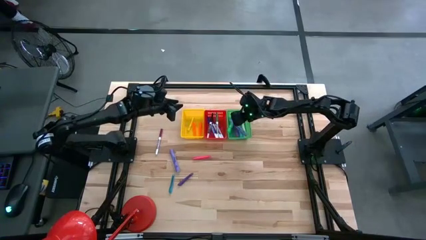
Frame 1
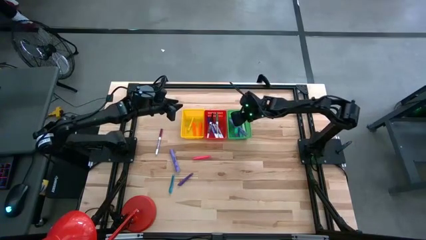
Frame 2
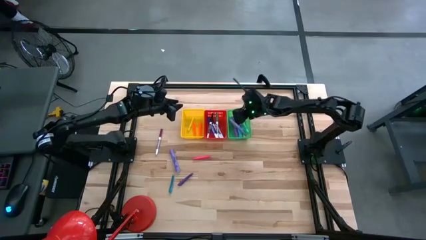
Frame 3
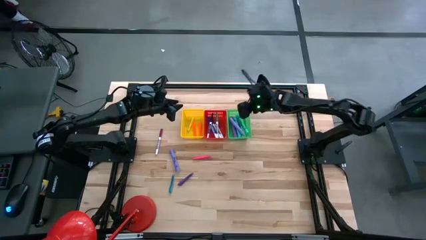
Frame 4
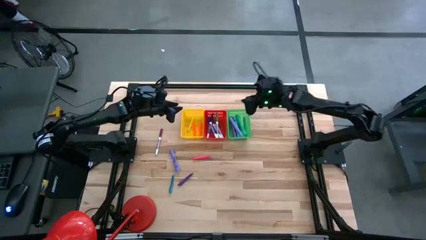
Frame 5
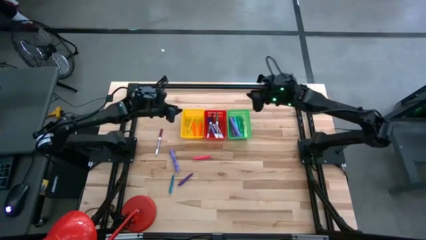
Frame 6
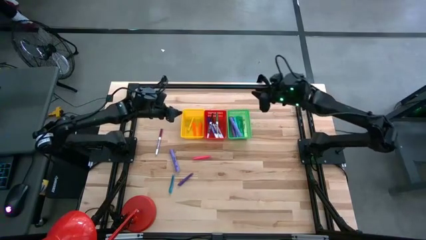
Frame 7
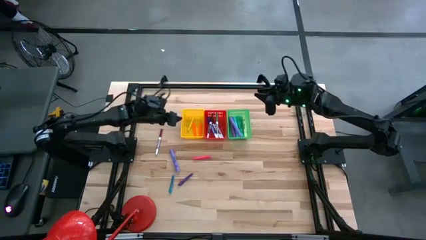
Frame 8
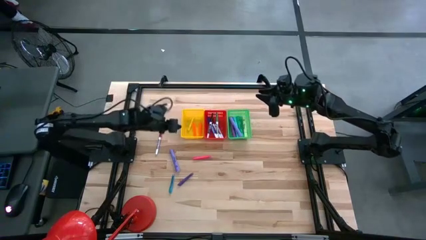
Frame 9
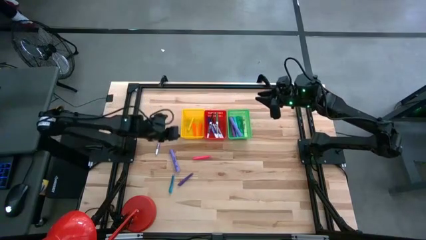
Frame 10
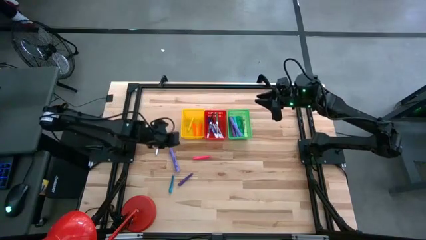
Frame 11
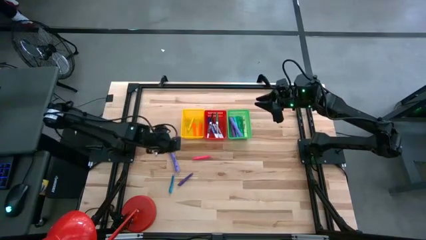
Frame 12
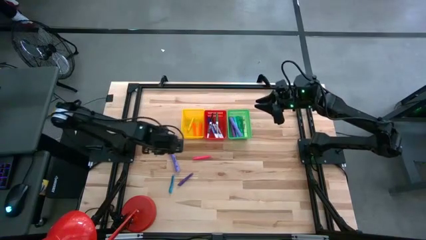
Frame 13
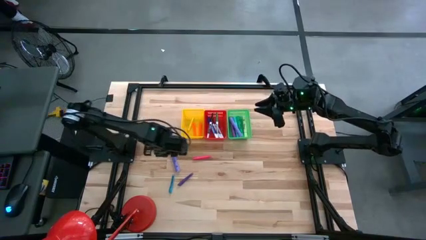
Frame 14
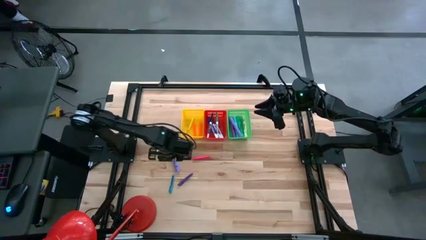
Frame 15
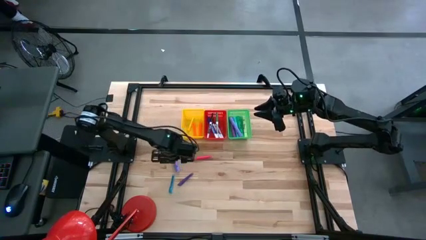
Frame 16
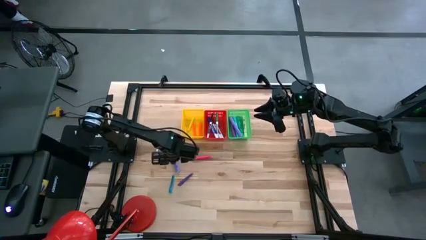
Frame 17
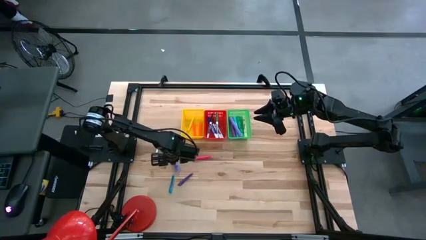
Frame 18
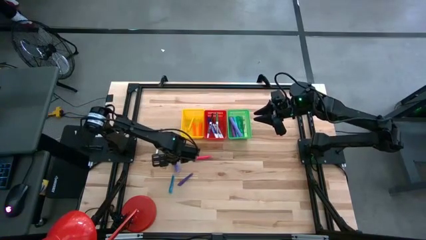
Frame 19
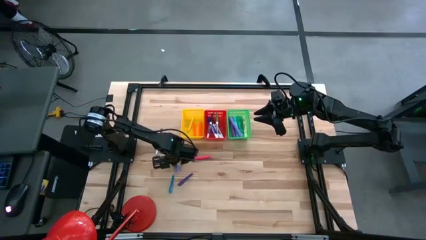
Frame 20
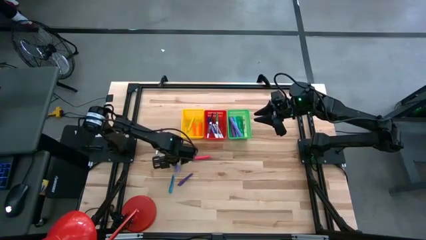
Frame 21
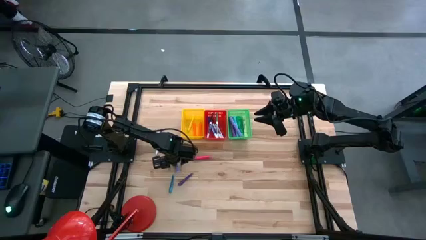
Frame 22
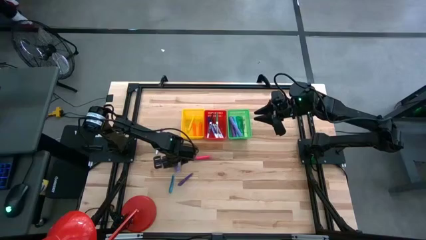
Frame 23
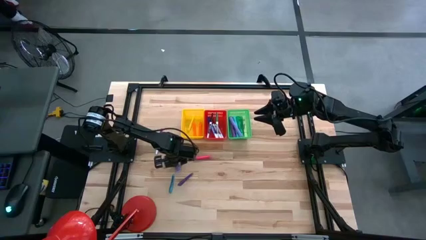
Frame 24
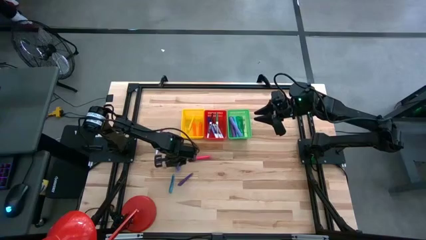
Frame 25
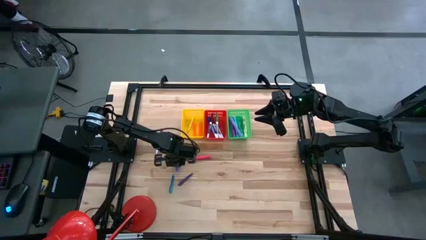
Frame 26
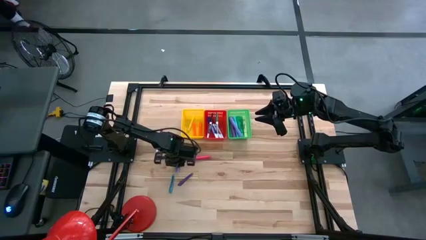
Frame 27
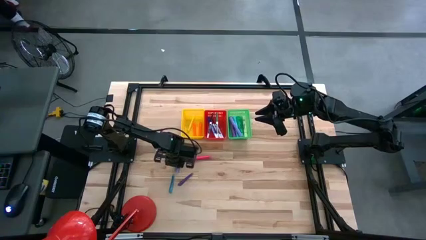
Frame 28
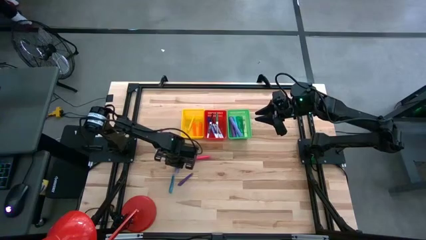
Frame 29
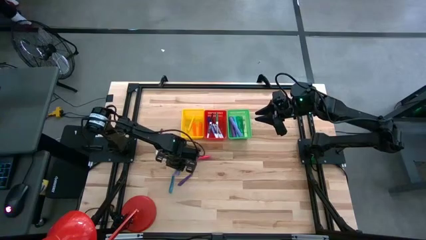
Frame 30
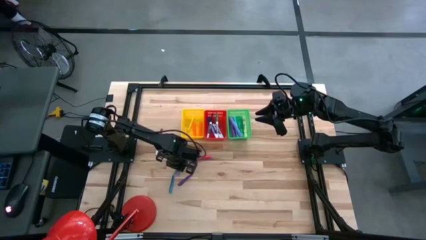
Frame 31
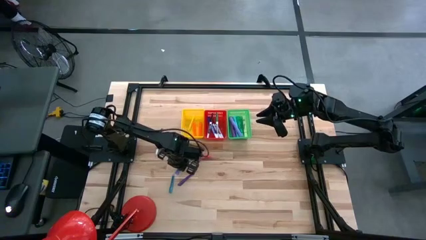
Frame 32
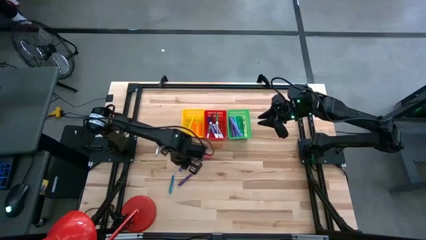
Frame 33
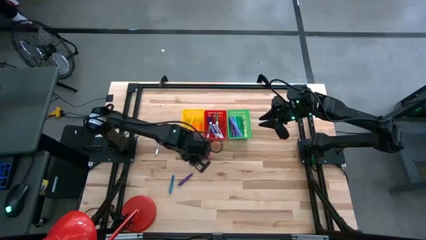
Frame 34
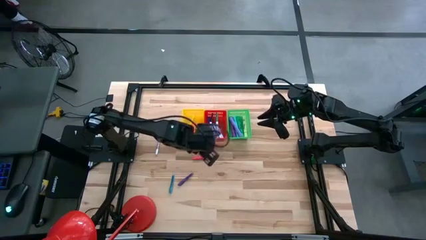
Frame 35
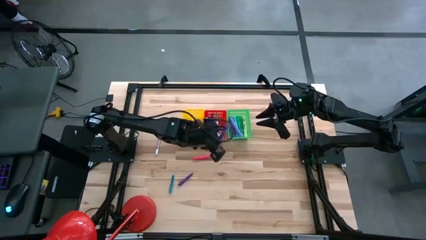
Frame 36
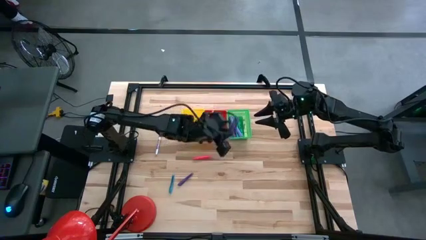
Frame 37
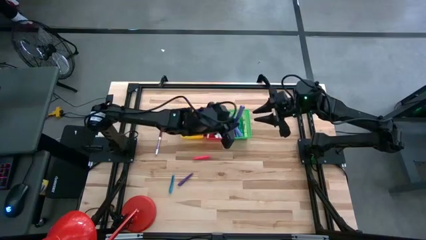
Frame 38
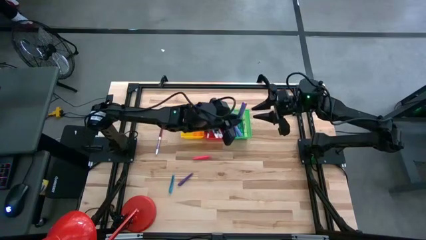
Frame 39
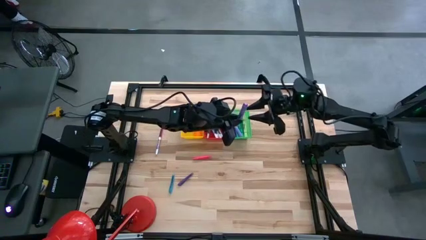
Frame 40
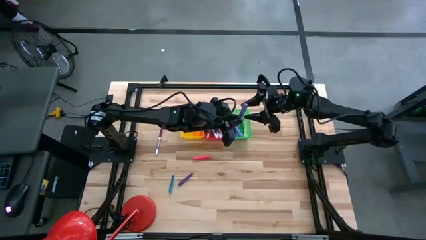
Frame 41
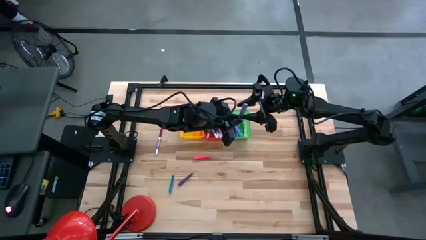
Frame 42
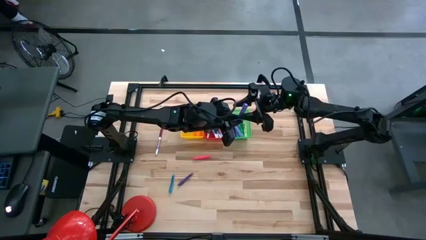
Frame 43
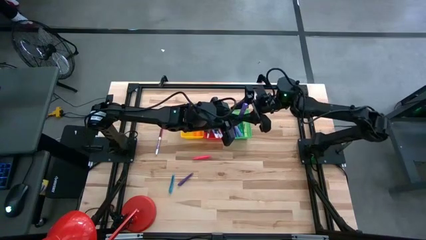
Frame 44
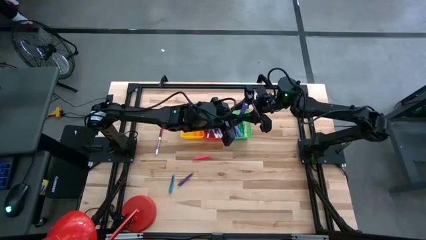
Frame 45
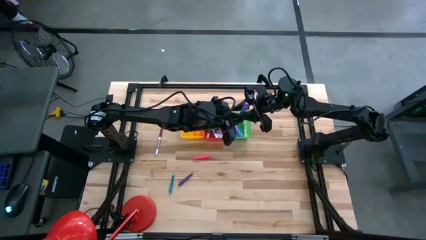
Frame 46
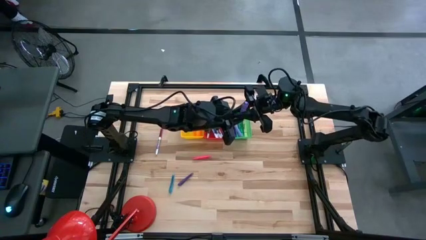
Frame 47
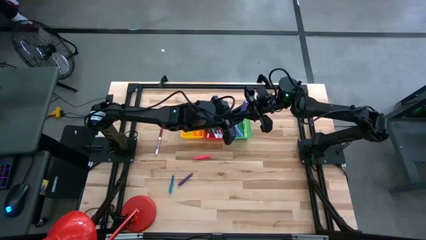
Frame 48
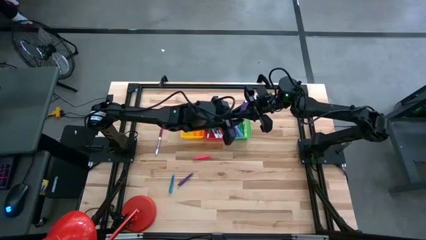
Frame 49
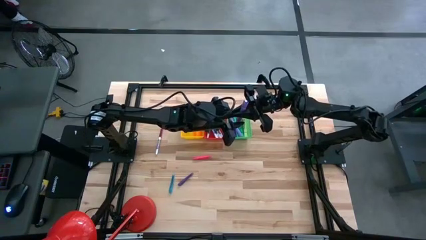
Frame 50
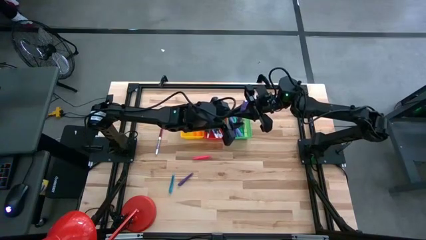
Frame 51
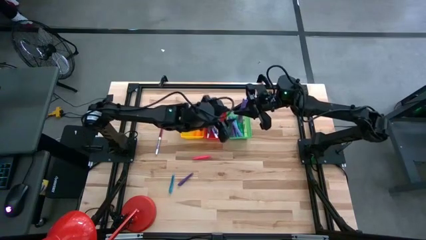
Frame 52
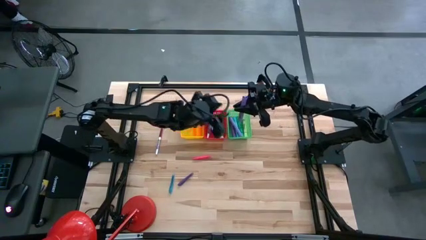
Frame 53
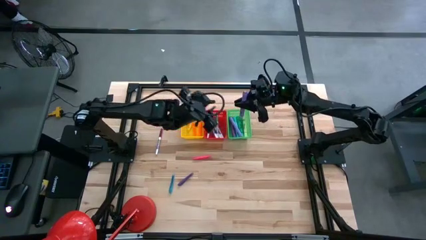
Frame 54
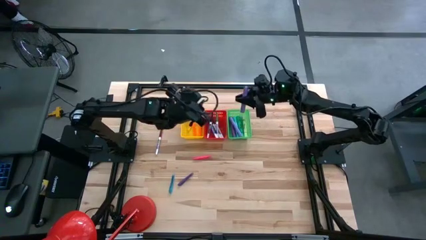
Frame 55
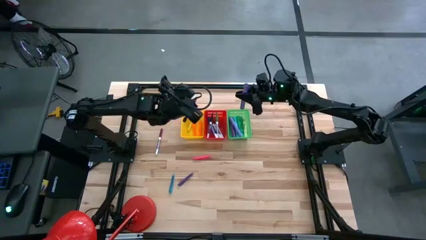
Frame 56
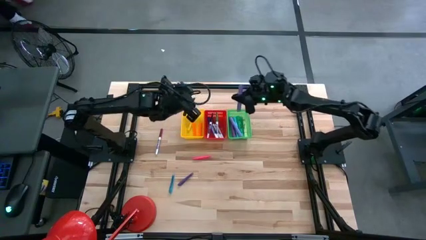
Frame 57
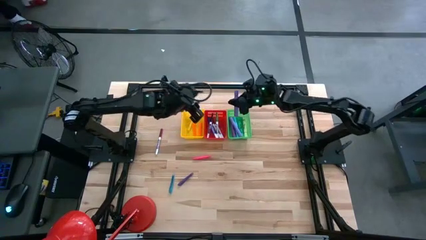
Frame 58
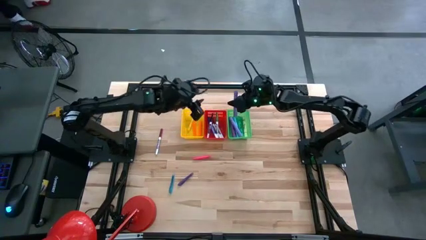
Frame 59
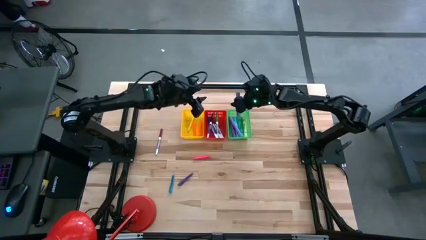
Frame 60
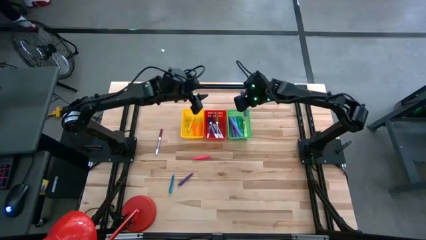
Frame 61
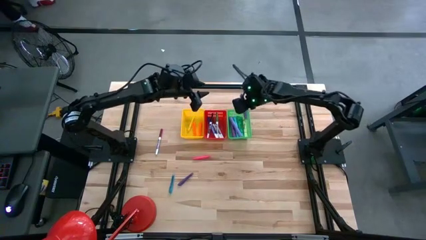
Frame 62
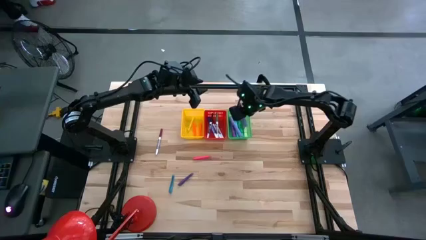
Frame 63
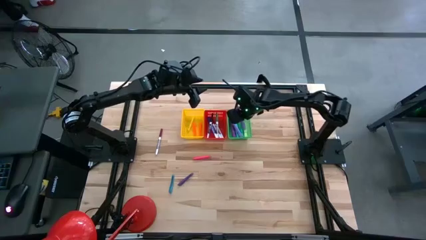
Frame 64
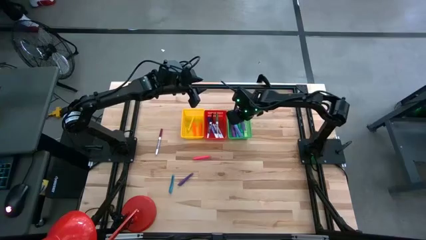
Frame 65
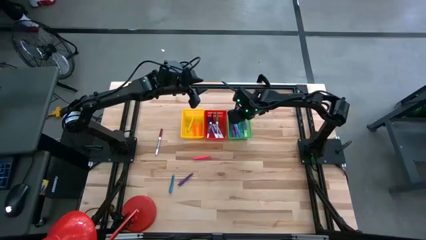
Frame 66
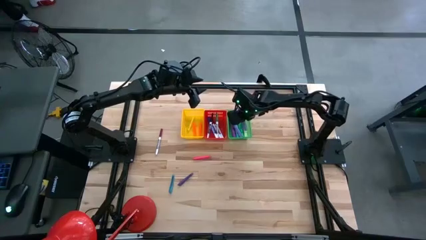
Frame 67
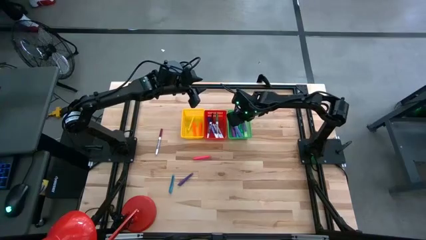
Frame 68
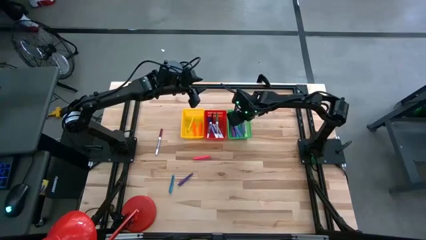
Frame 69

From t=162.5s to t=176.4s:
Task: Pick & Place Markers
Put the purple highlighter into the green bin
